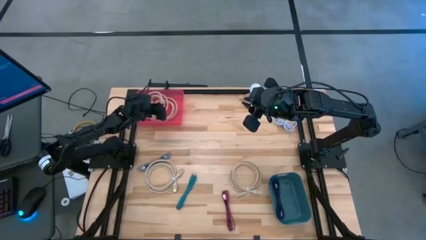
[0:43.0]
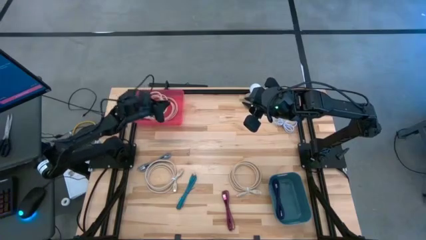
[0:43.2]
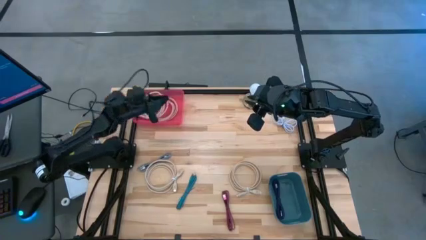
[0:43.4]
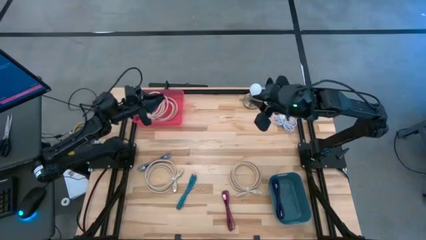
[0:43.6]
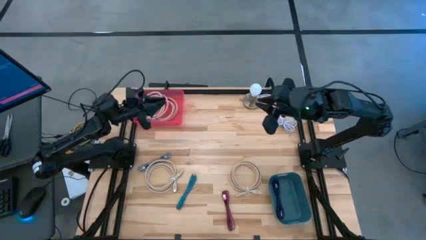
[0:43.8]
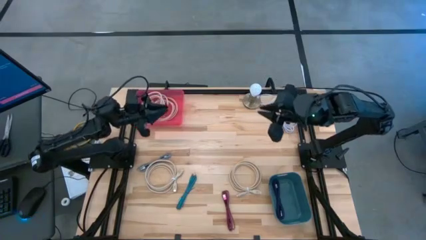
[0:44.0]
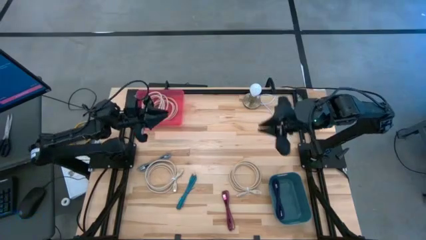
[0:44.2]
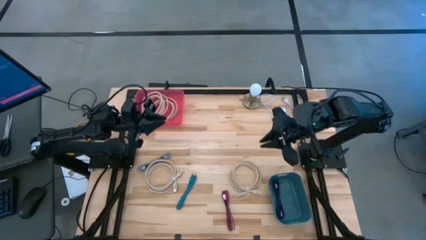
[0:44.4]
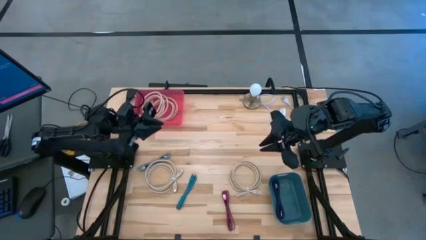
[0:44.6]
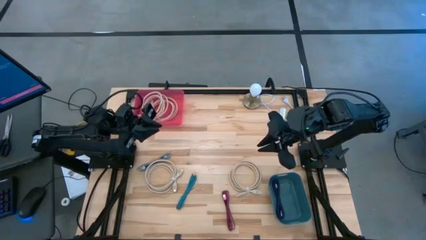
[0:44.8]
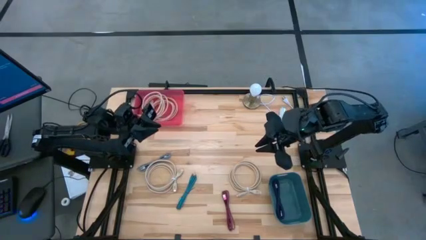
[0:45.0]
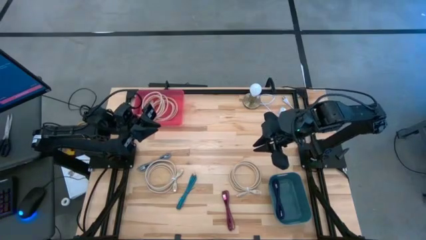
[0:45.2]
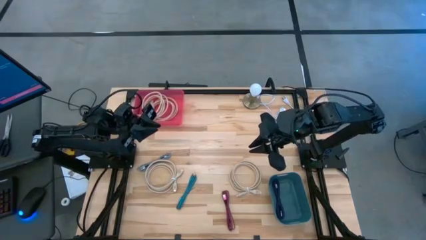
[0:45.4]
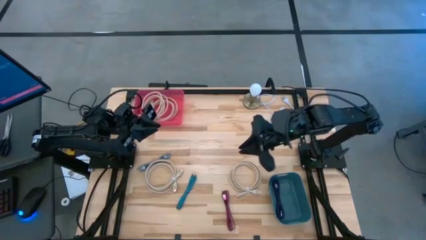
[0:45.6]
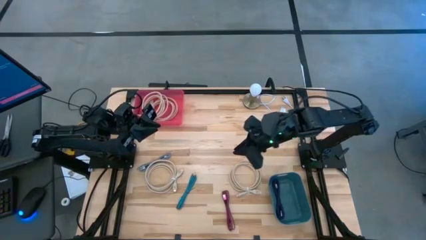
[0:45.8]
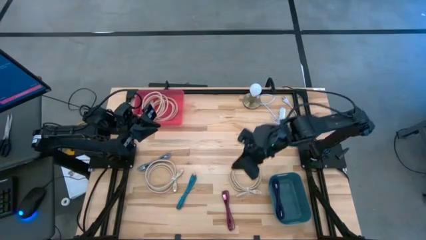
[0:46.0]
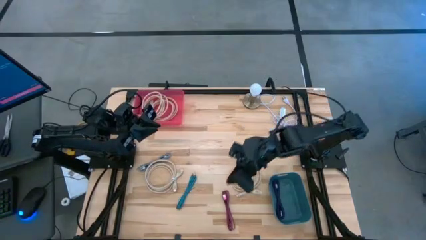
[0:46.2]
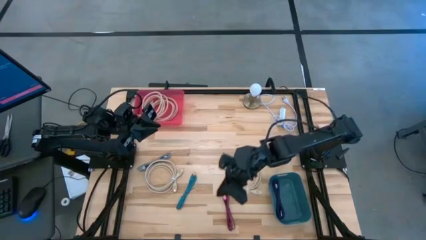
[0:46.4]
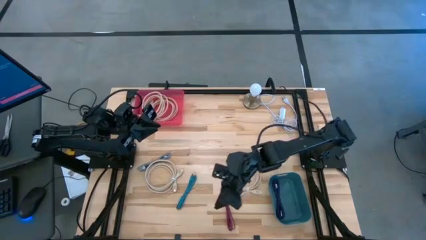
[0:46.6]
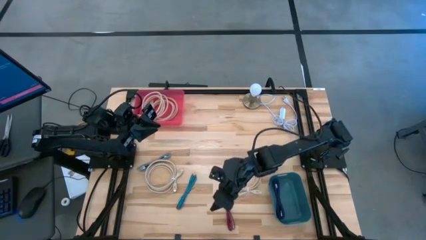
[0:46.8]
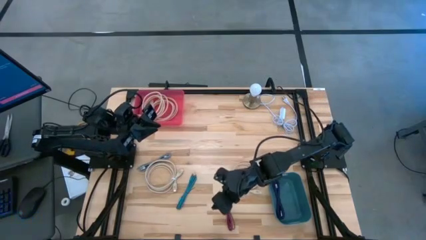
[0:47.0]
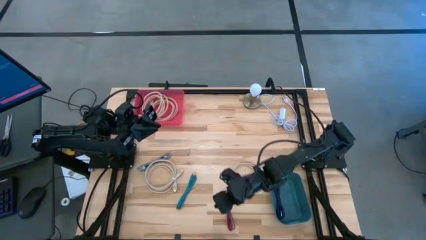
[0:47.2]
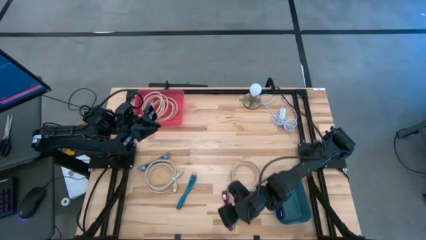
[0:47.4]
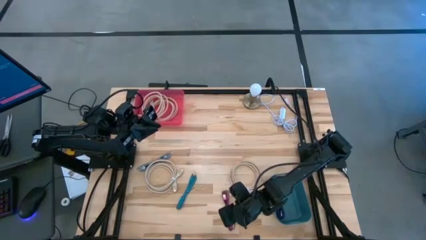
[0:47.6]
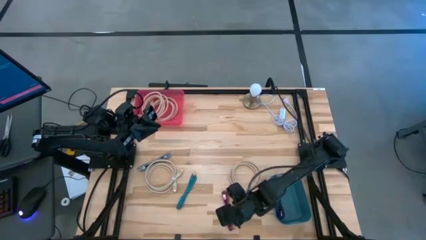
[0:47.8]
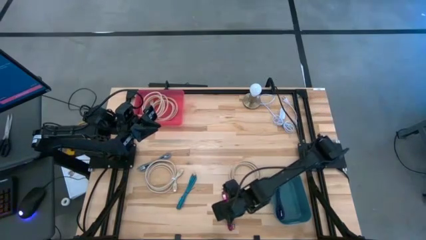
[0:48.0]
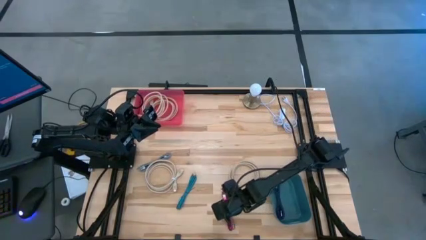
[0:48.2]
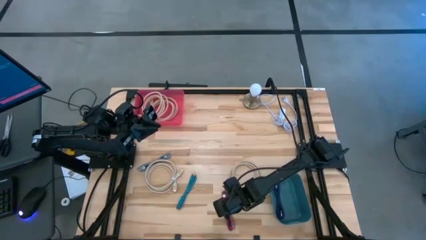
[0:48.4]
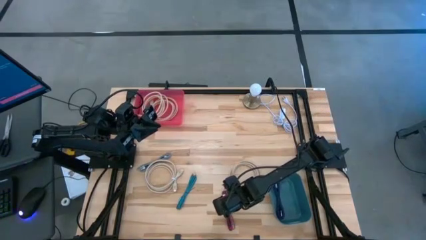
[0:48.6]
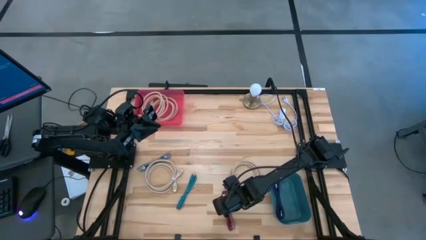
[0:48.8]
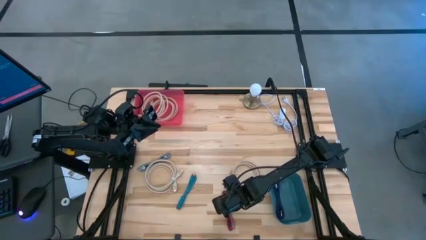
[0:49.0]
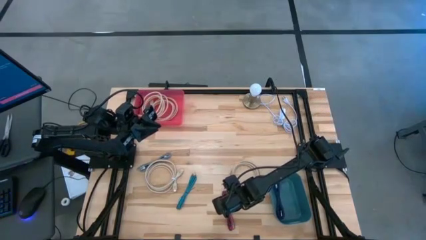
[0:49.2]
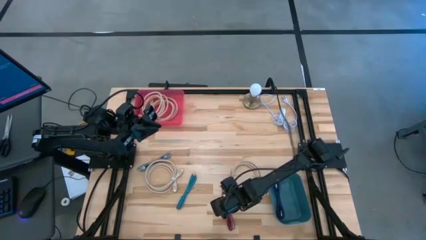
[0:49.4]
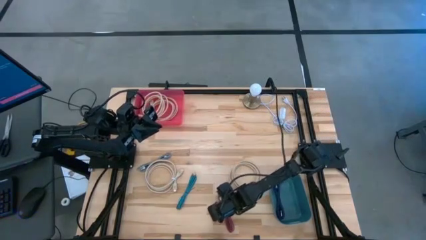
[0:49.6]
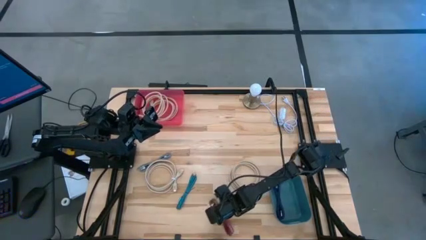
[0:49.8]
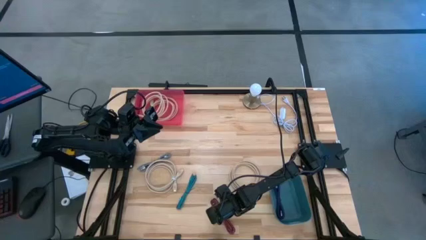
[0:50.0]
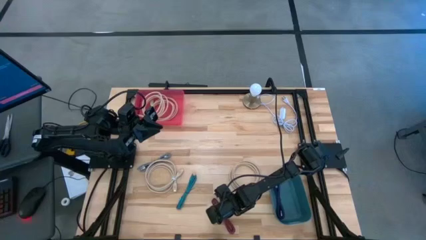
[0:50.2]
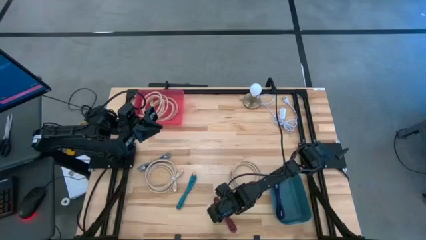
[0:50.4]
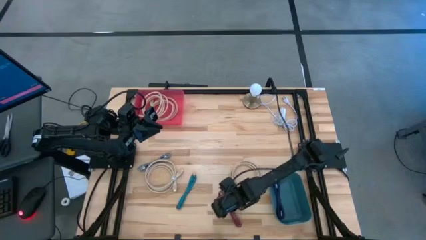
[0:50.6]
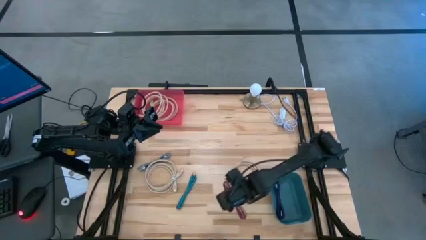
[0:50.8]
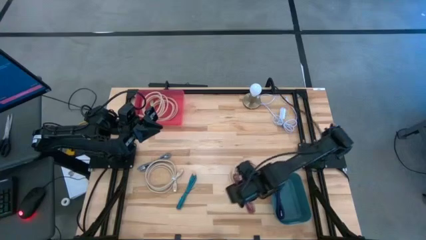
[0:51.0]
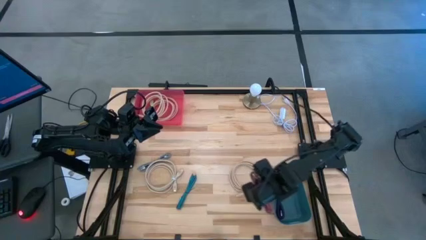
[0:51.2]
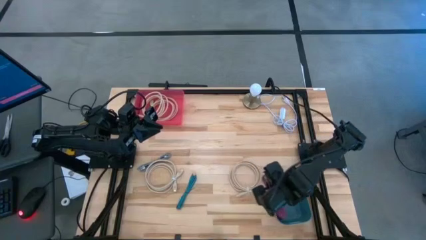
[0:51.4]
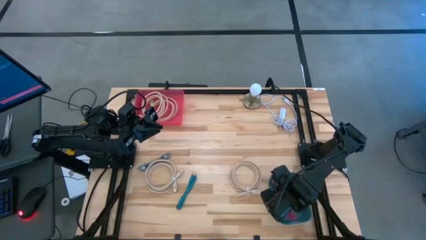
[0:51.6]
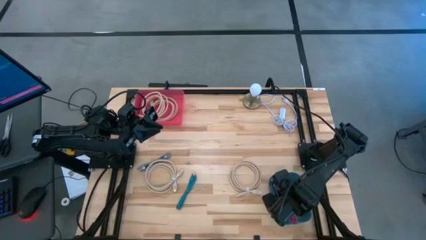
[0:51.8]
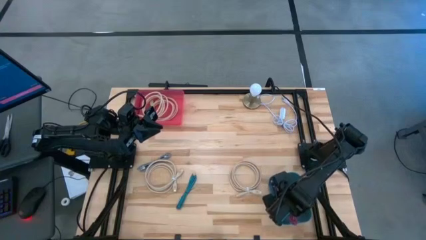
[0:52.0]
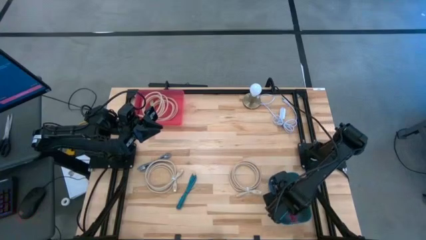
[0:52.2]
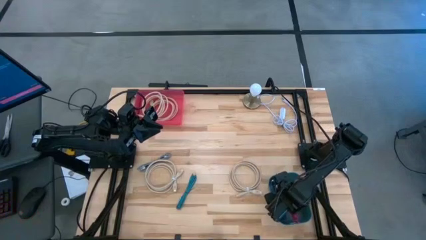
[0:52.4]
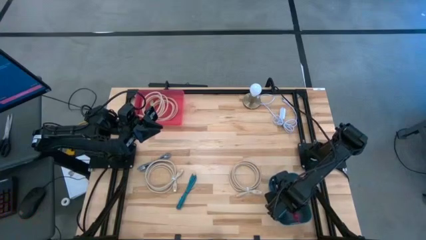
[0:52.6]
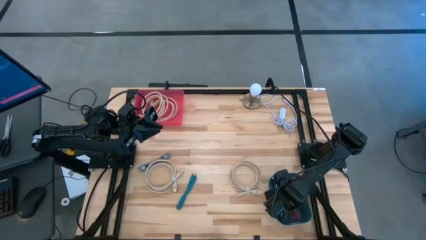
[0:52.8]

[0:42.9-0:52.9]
Task: Pick & Place USB Port
Put the red charger cable into the blue bin

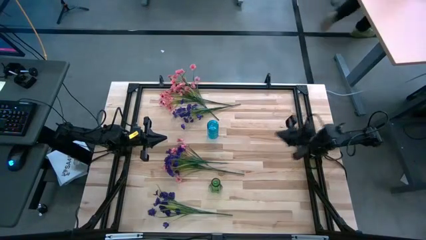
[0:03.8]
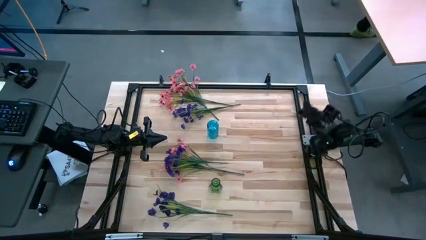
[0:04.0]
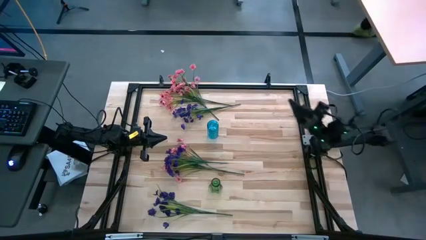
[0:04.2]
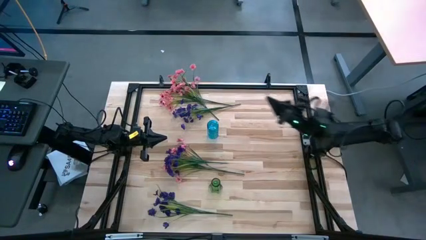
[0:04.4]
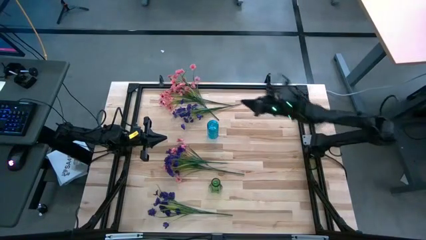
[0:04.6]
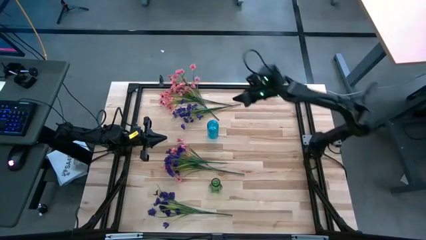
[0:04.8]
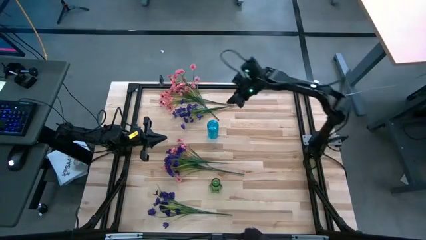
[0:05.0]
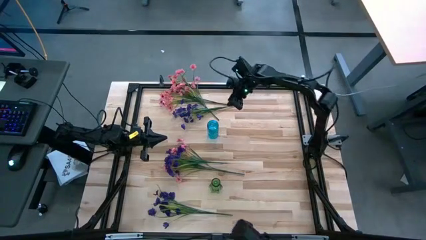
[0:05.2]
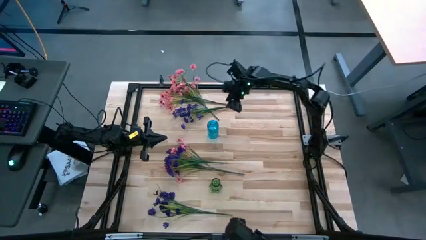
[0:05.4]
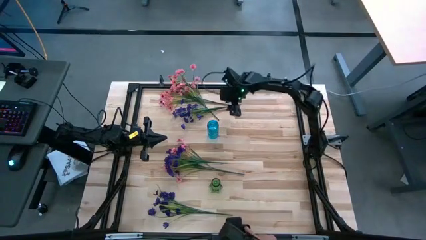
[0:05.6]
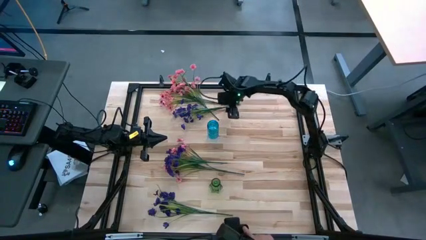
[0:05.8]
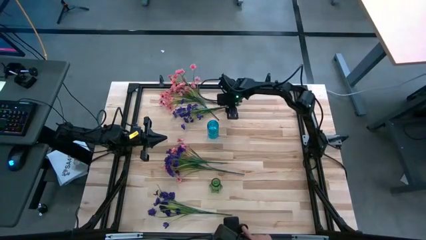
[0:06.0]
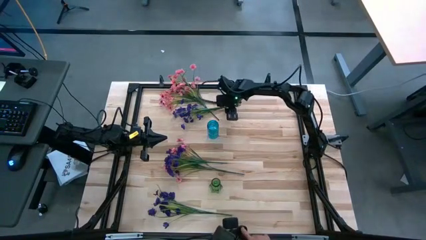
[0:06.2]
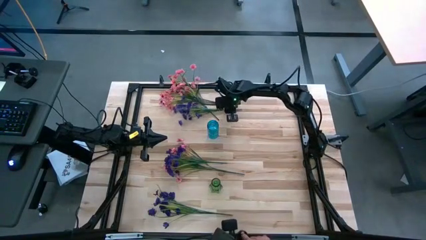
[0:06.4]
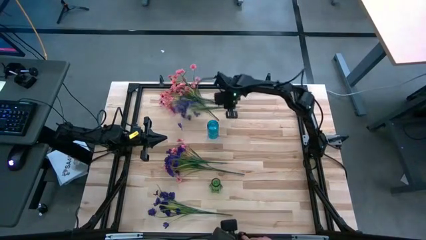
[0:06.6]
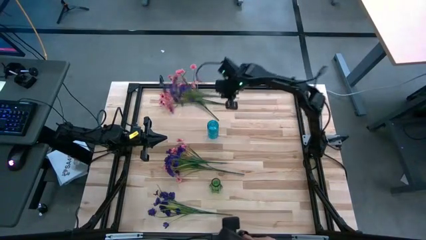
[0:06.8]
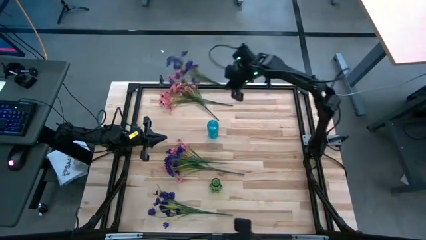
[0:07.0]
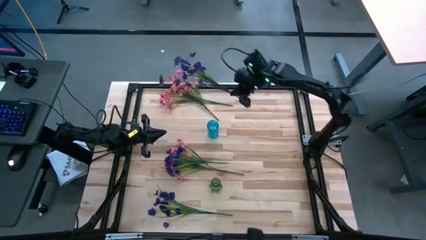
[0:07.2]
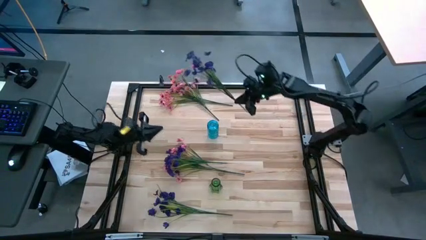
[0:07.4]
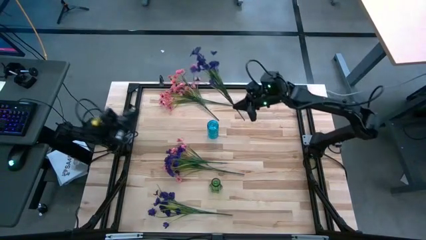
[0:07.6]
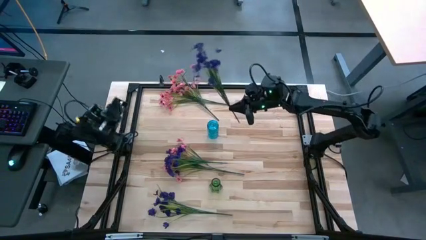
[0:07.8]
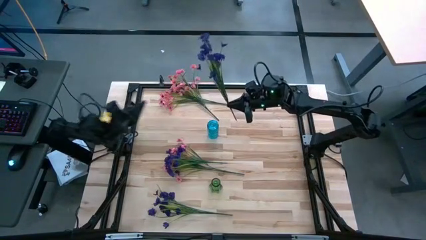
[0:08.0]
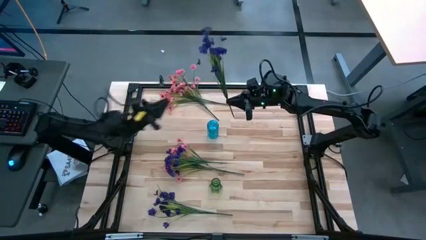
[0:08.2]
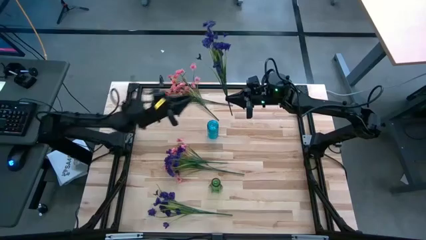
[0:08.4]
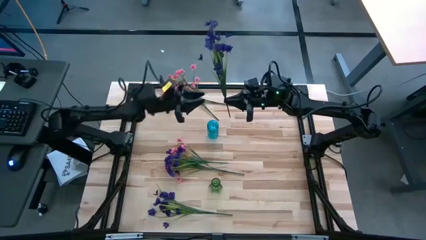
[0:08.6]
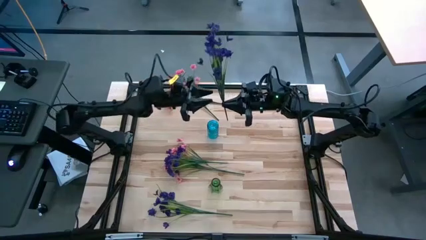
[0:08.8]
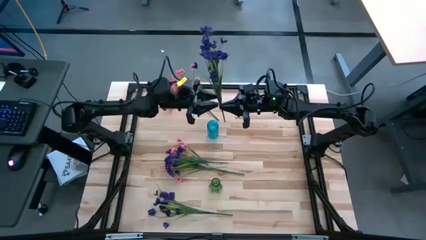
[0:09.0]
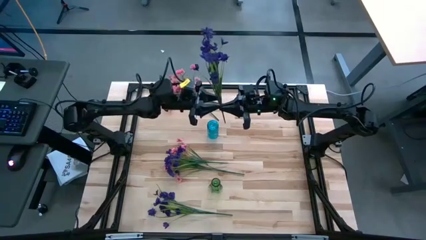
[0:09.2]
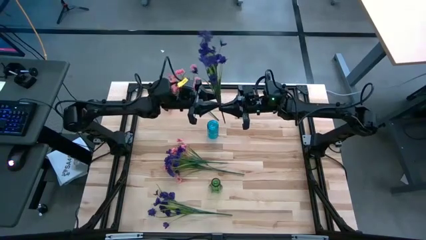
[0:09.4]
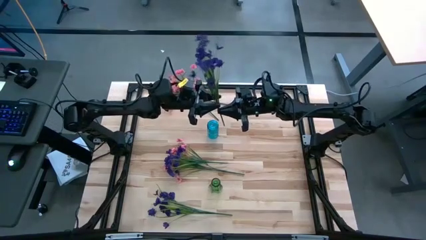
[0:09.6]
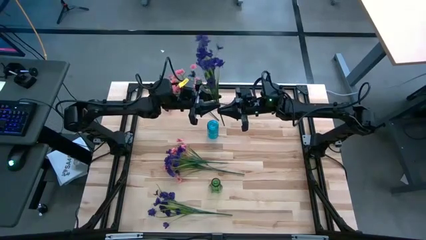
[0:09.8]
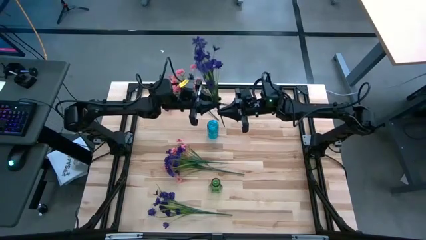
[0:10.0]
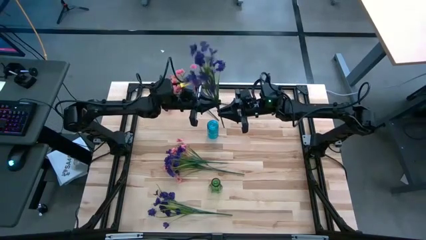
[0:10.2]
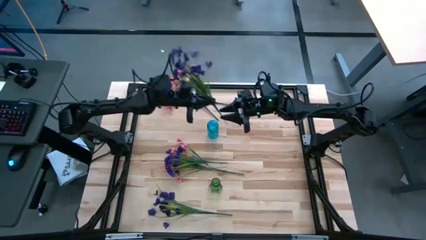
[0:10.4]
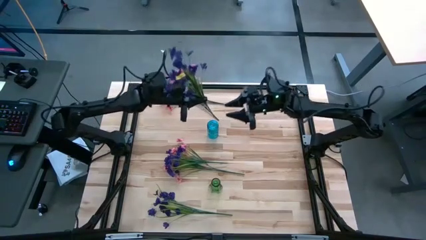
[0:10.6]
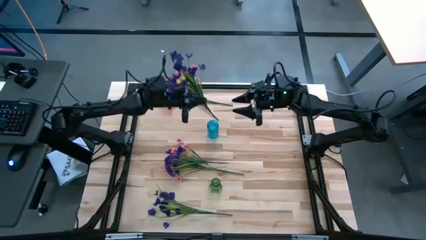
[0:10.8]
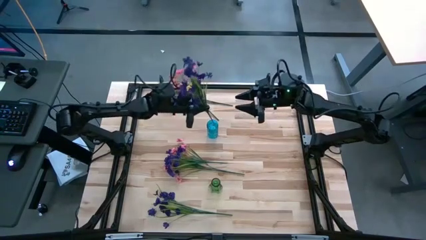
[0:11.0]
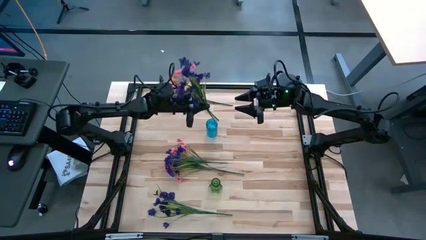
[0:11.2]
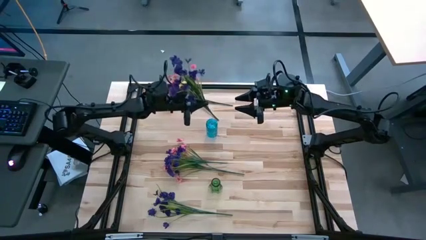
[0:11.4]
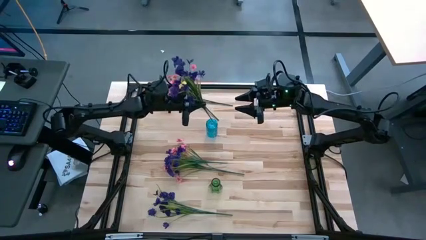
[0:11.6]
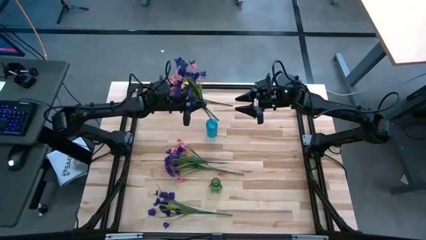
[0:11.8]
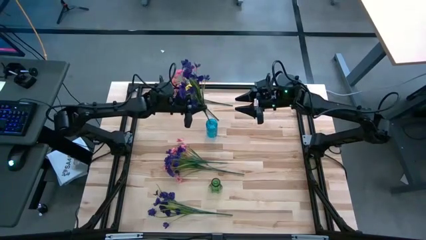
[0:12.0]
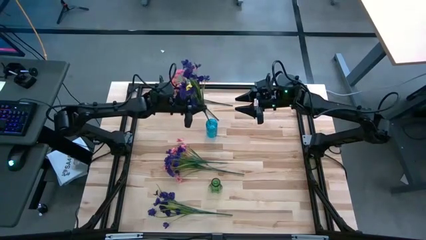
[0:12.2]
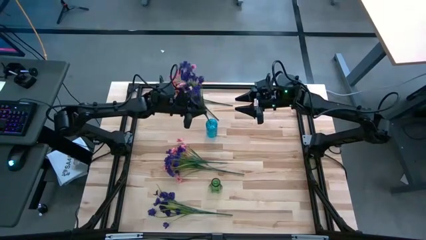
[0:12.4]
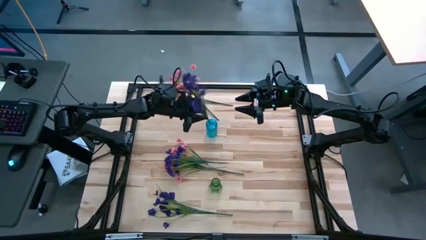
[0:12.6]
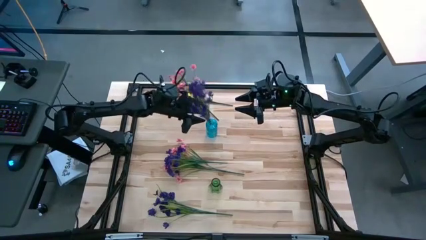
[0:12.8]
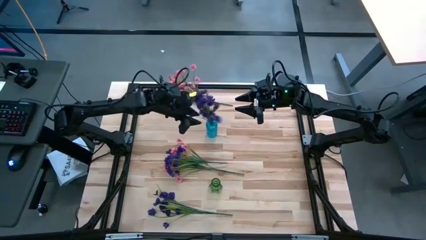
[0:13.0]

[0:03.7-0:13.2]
Task: Sort flowers into vase by color
Put the top violet flowers into the blue crystal vase
